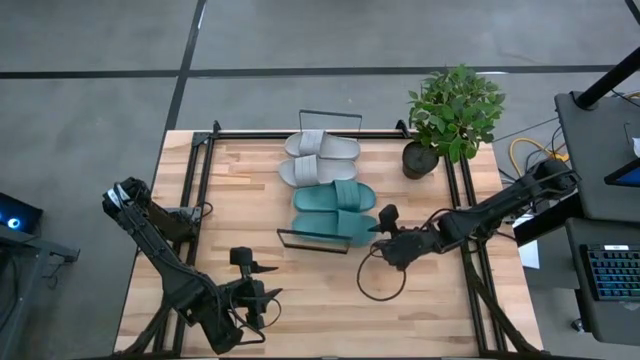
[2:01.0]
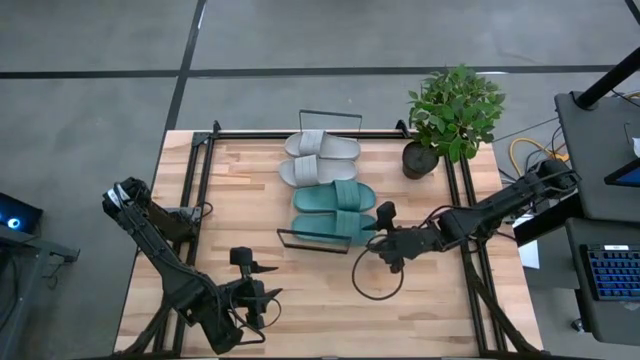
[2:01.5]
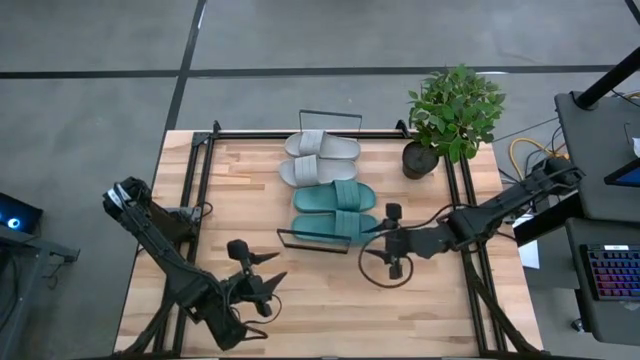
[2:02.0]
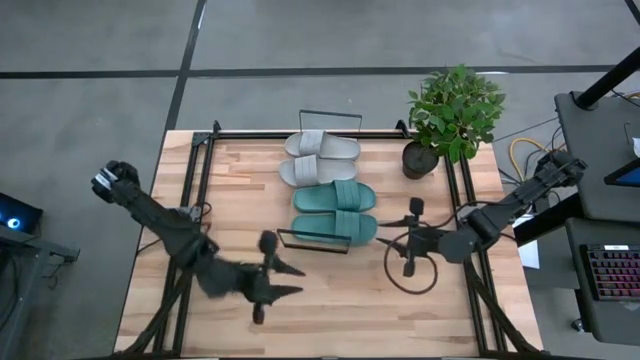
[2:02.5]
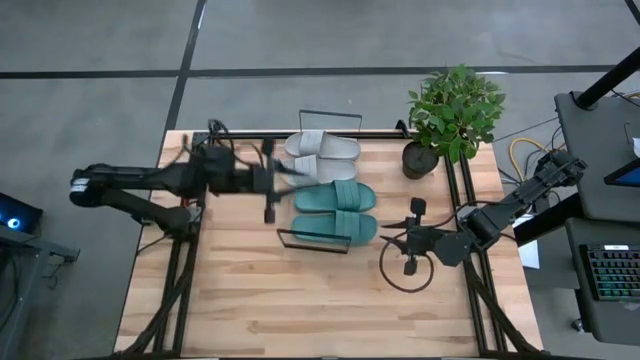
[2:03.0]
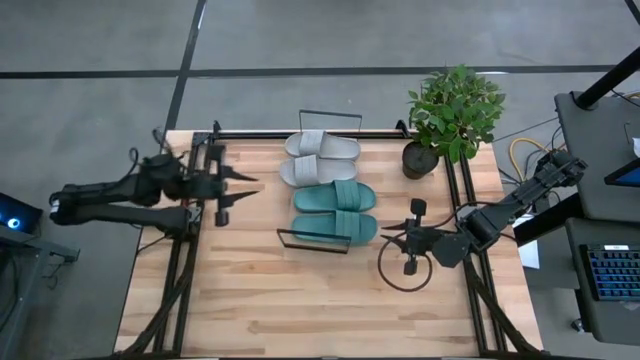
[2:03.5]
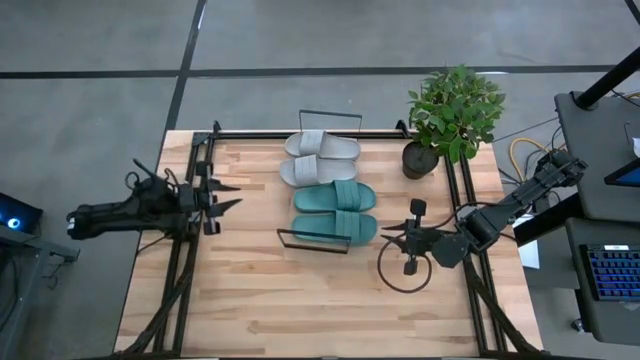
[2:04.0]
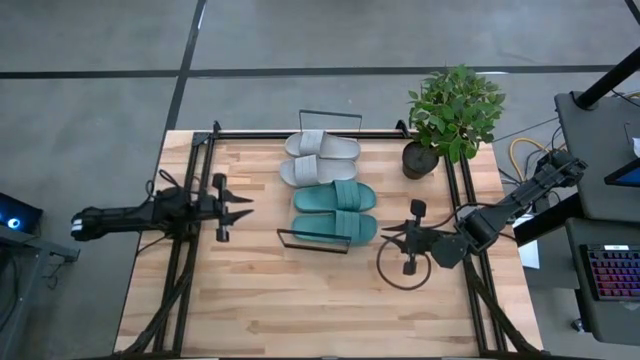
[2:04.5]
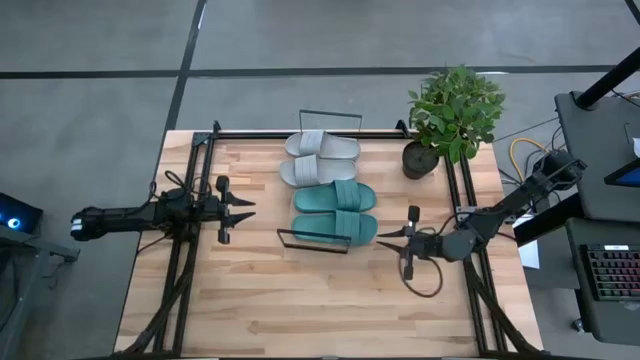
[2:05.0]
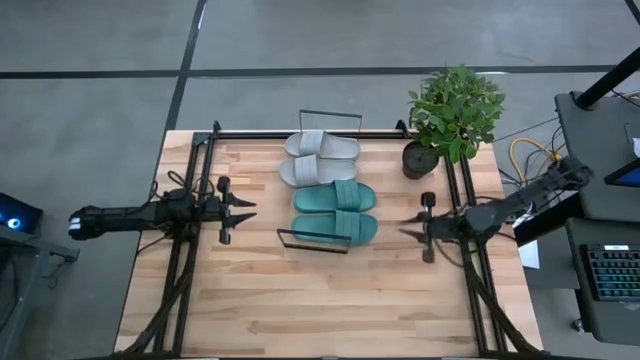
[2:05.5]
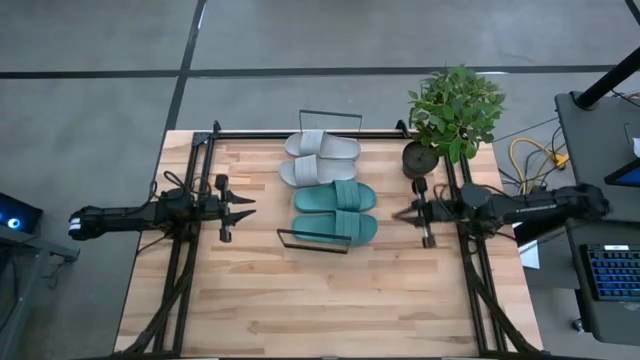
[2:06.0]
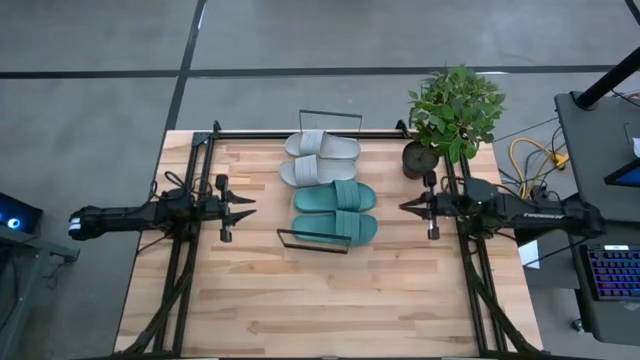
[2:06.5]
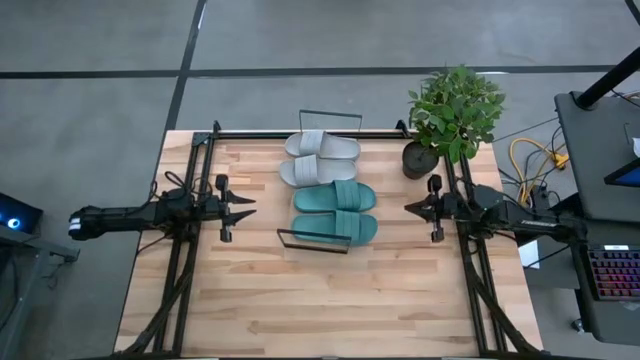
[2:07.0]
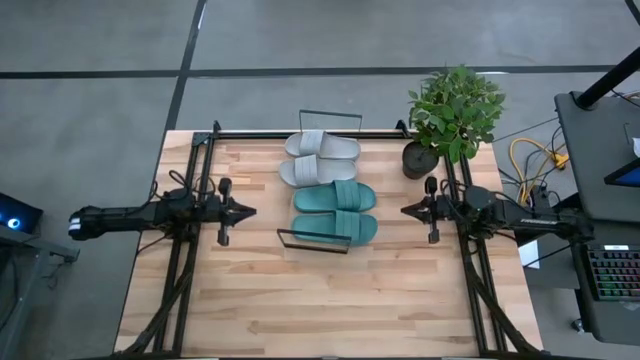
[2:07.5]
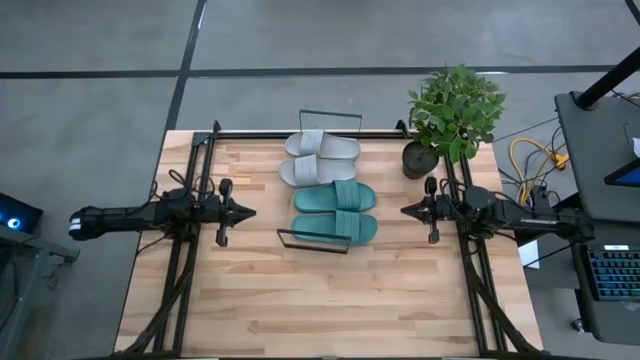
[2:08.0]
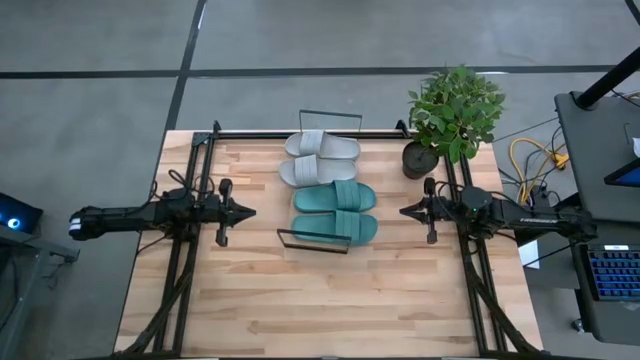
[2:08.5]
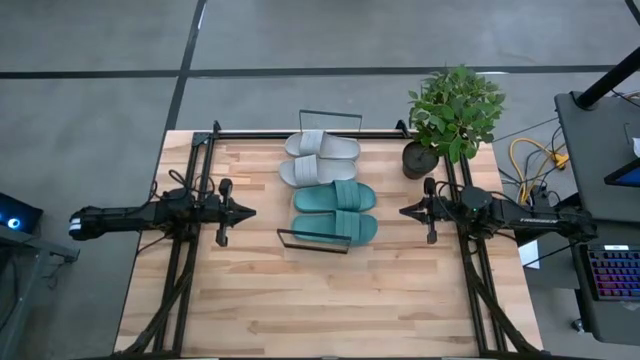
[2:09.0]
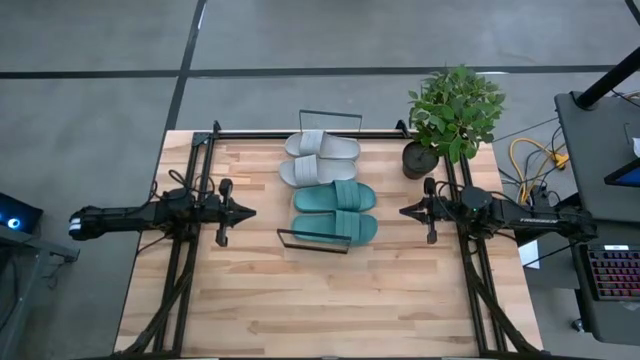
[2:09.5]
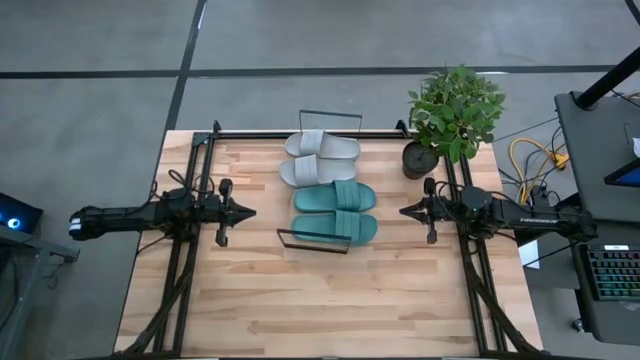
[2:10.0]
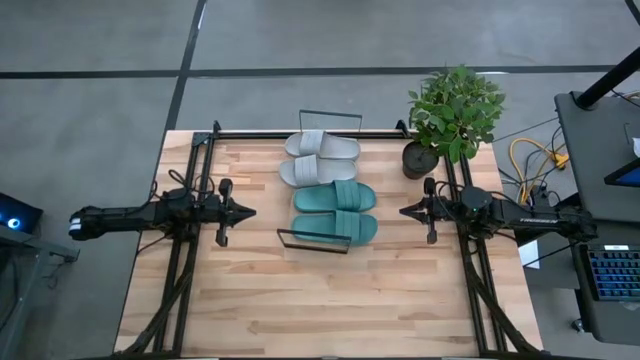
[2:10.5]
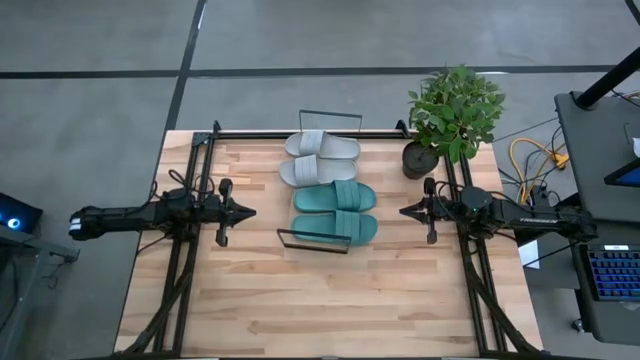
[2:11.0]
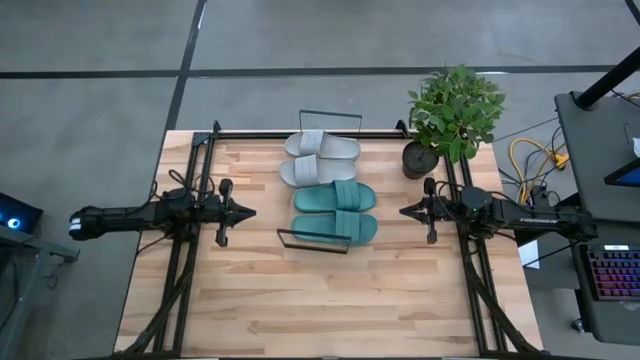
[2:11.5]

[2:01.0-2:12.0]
Task: Pick and place slides into the shelf
Return to Home Position

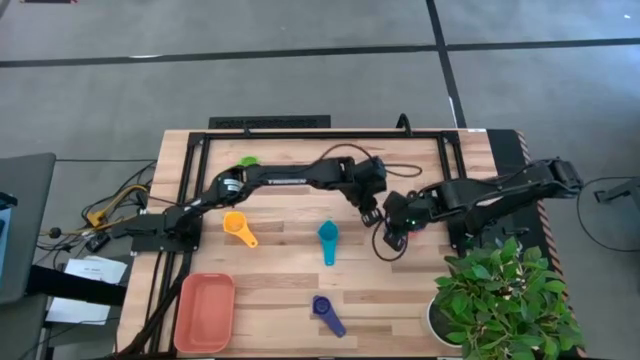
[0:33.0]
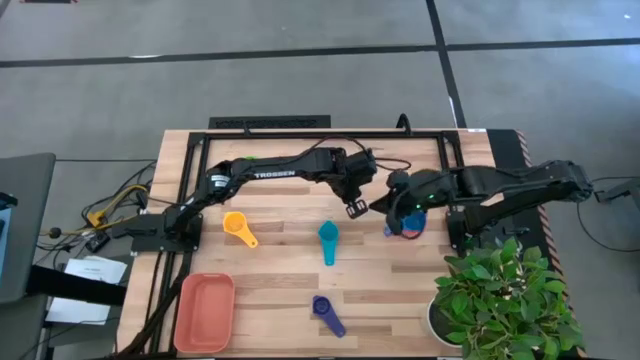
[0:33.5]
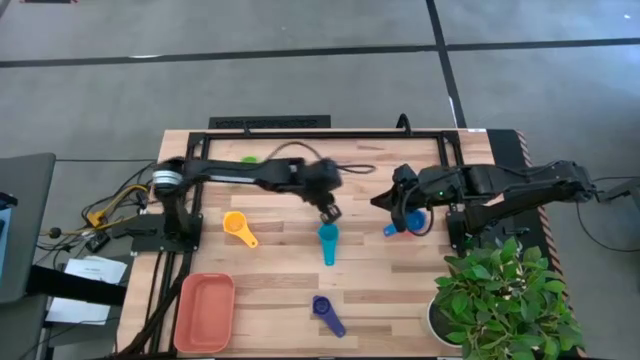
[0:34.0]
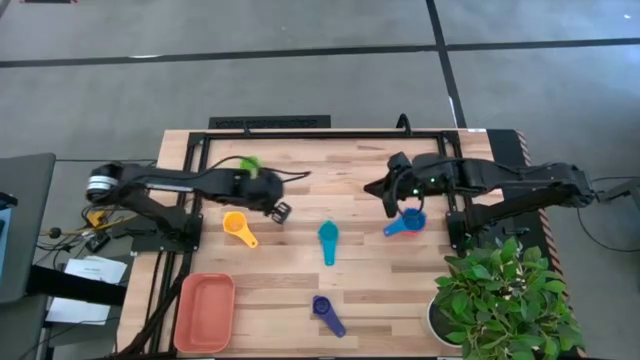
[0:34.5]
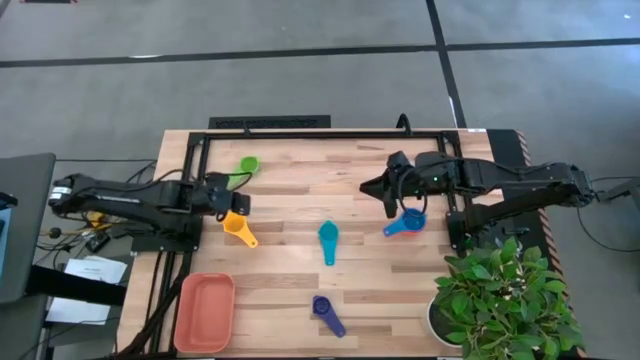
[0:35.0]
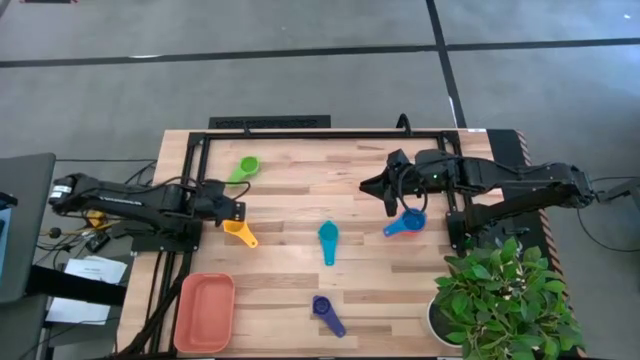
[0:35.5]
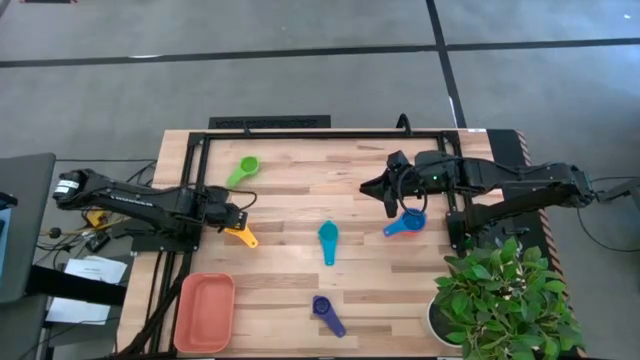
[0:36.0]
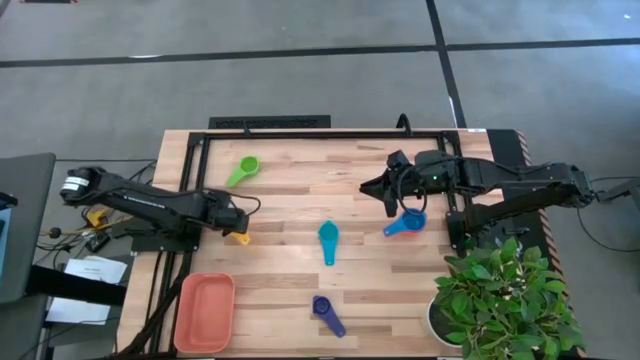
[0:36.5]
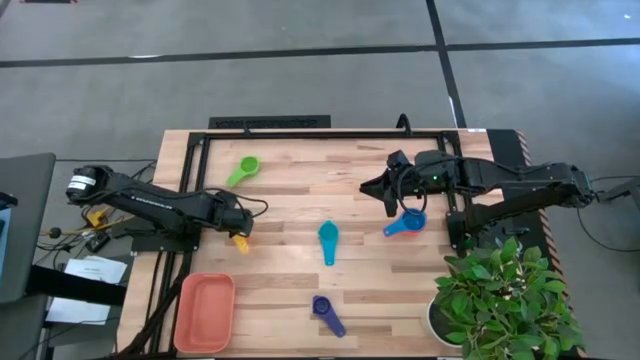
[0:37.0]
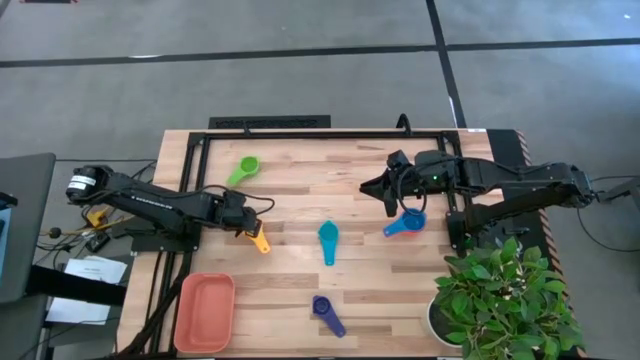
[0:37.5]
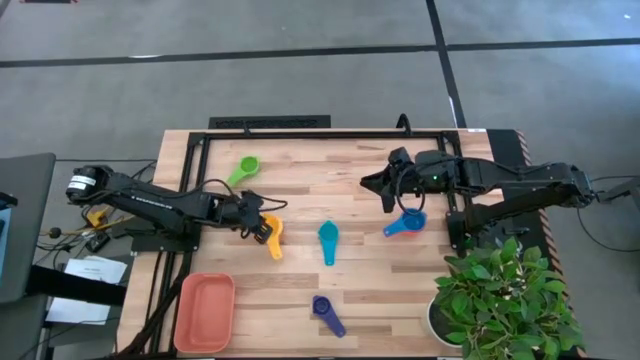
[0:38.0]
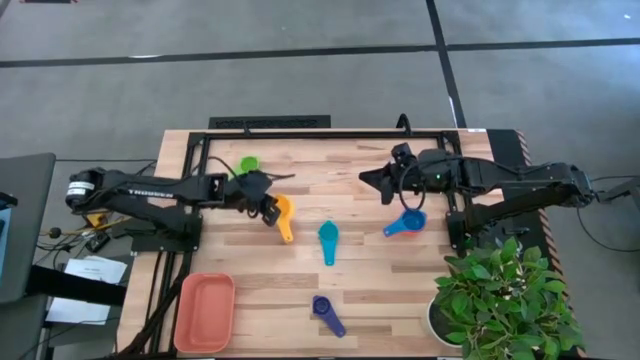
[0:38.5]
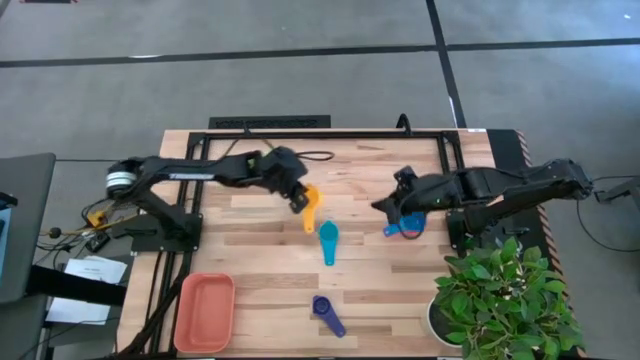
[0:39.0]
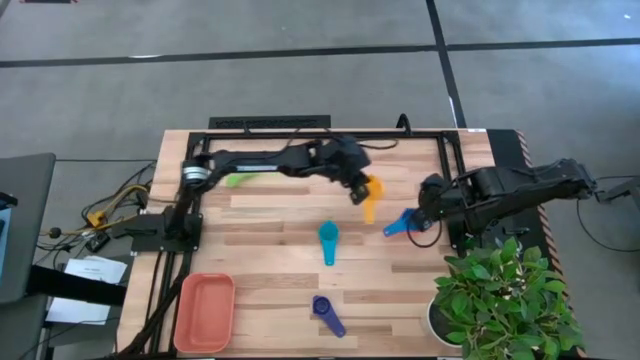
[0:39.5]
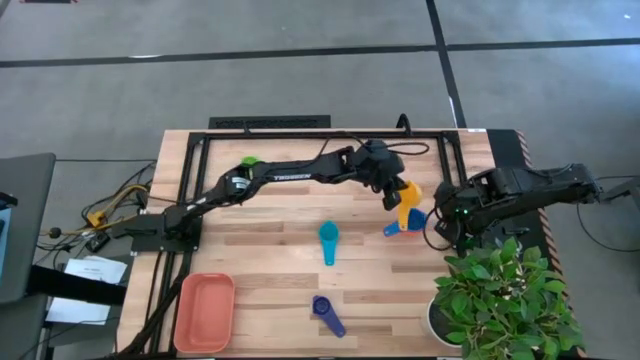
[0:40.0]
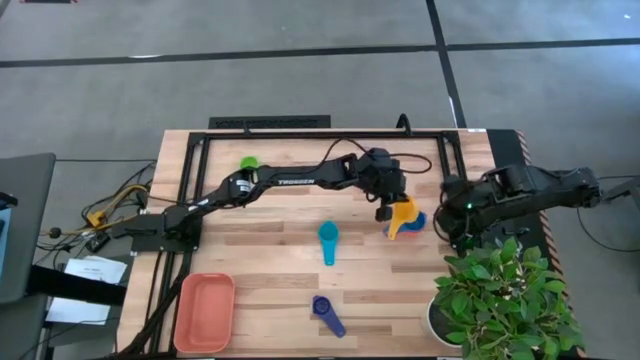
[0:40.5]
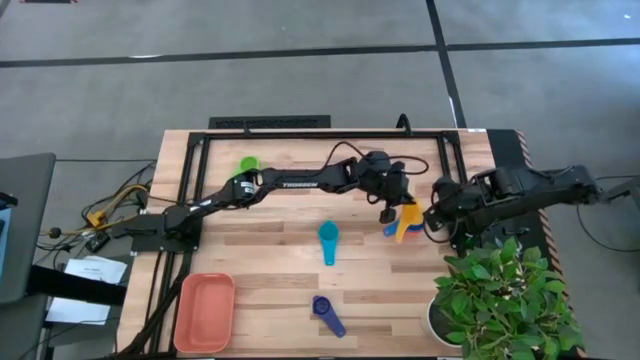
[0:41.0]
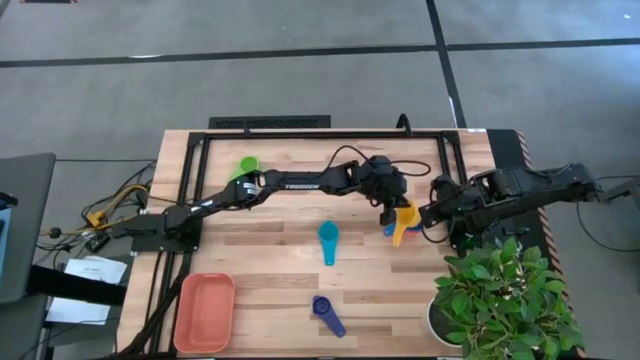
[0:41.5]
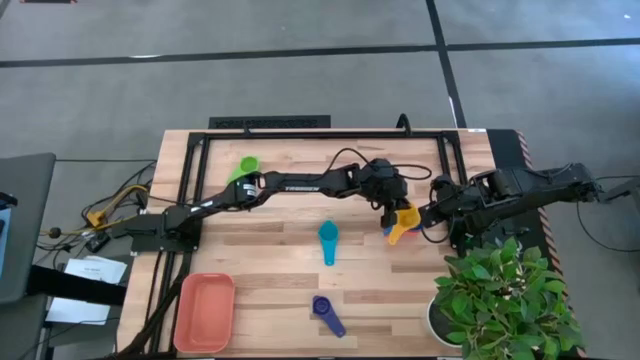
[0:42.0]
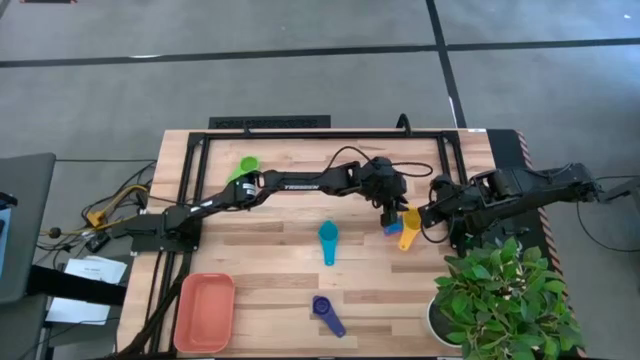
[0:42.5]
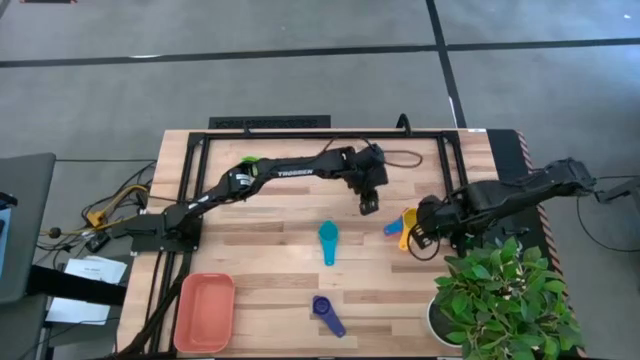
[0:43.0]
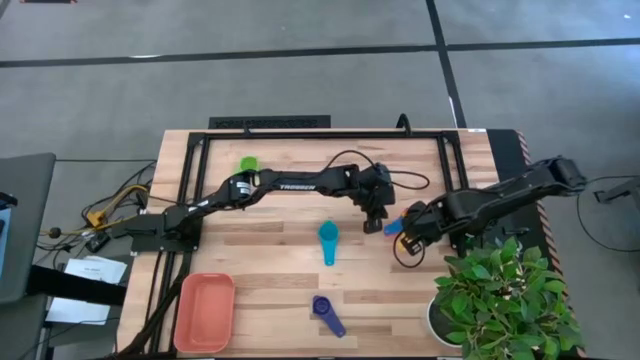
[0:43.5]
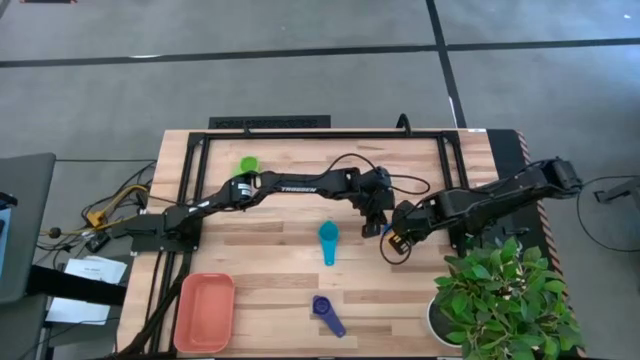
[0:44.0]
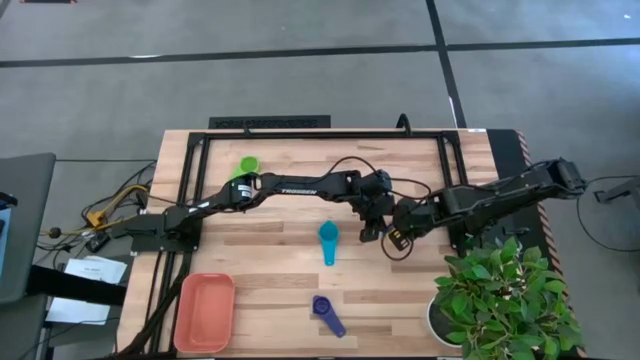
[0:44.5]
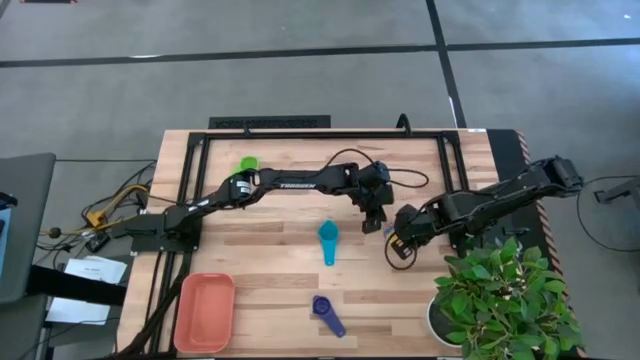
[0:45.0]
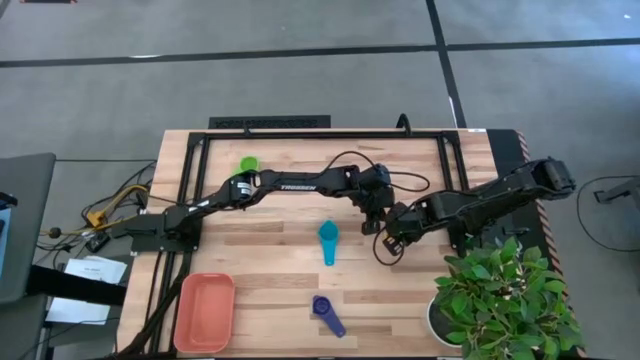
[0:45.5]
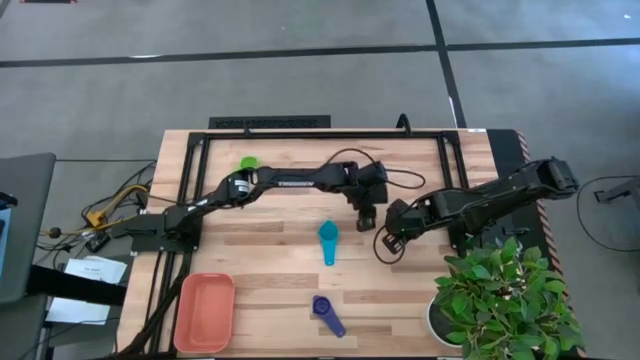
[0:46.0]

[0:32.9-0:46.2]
Task: Nest measuring cups in basket
Stack the yellow measuring cup on top of the blue measuring cup
